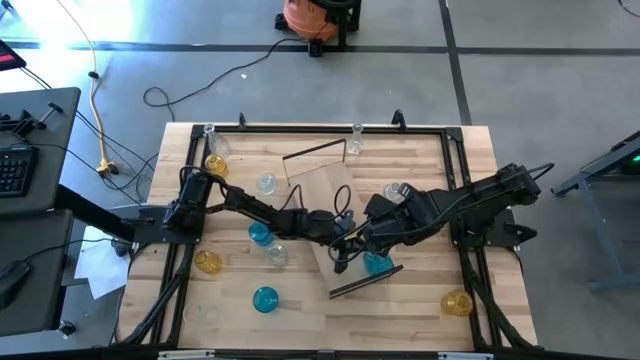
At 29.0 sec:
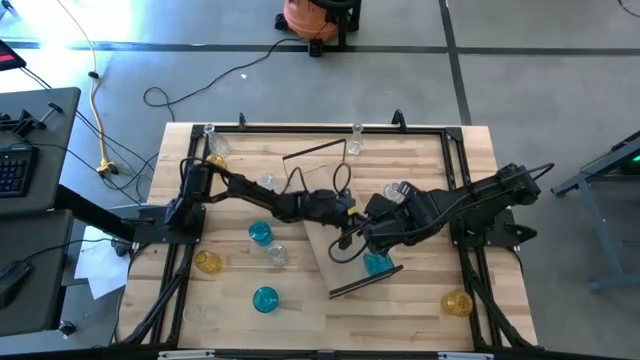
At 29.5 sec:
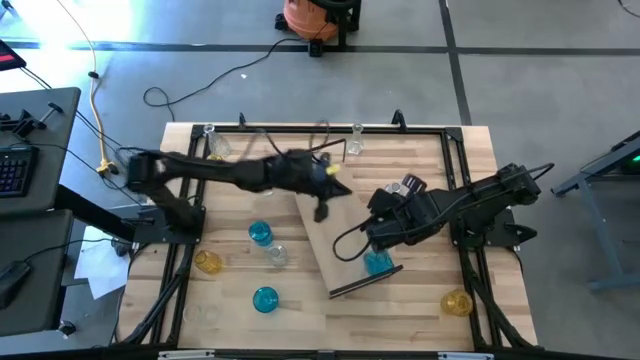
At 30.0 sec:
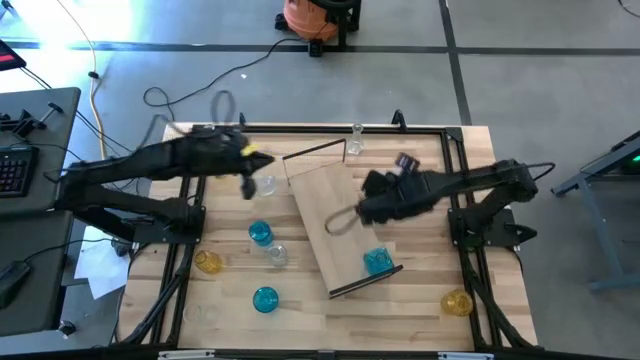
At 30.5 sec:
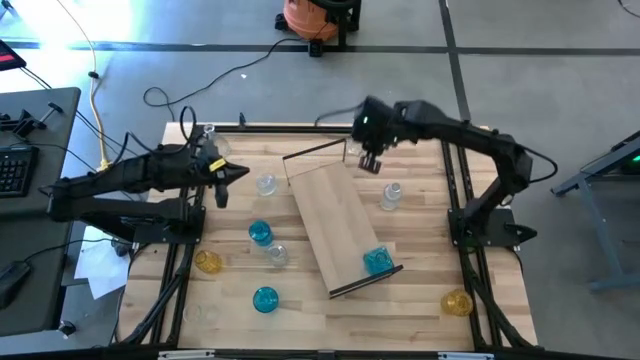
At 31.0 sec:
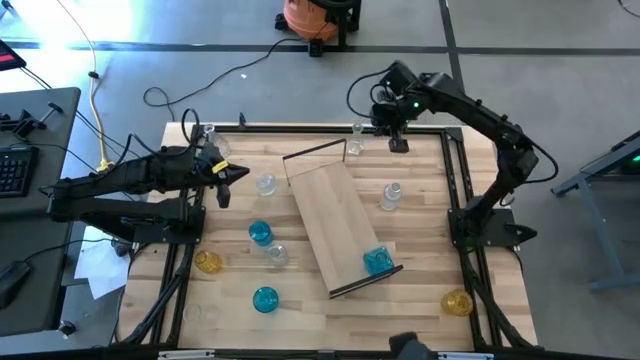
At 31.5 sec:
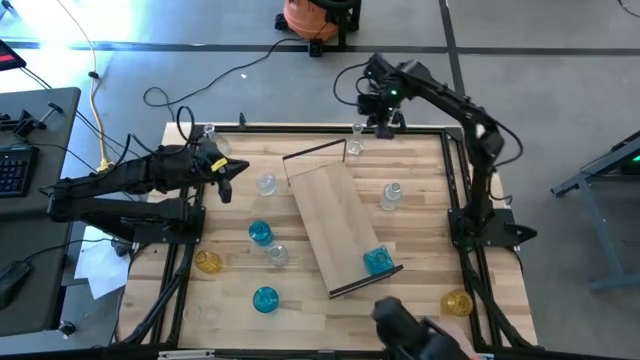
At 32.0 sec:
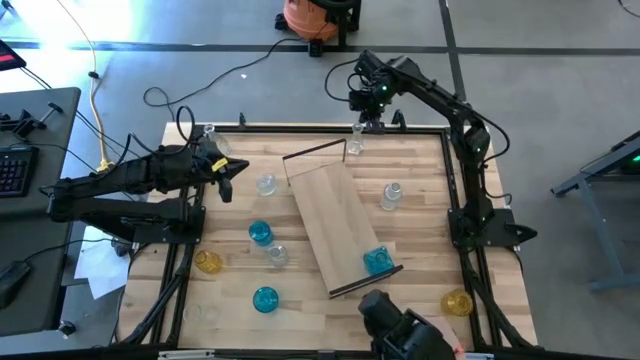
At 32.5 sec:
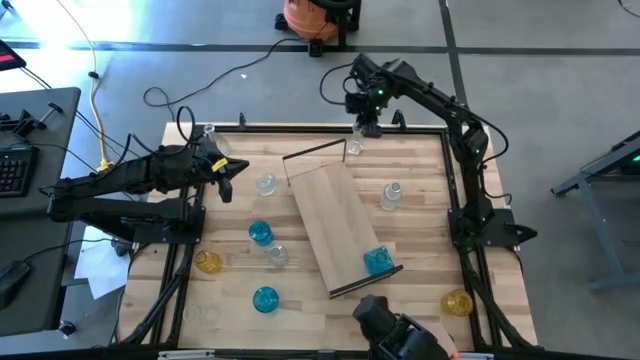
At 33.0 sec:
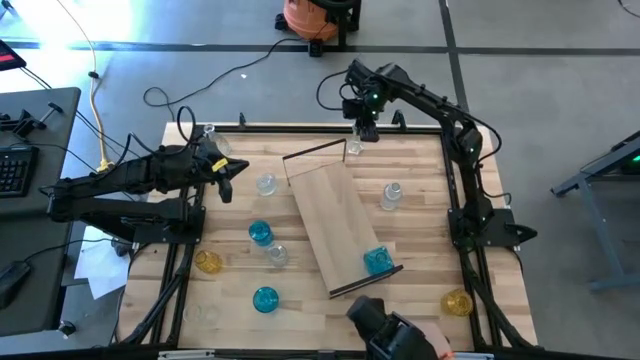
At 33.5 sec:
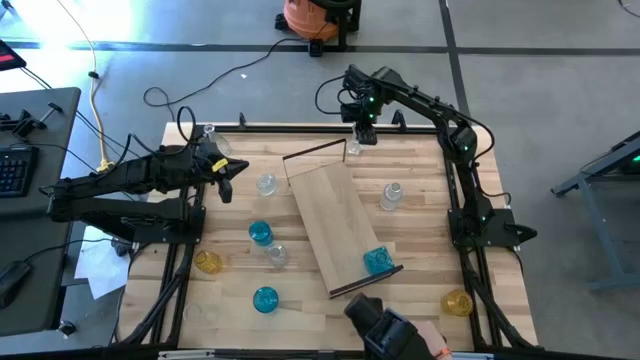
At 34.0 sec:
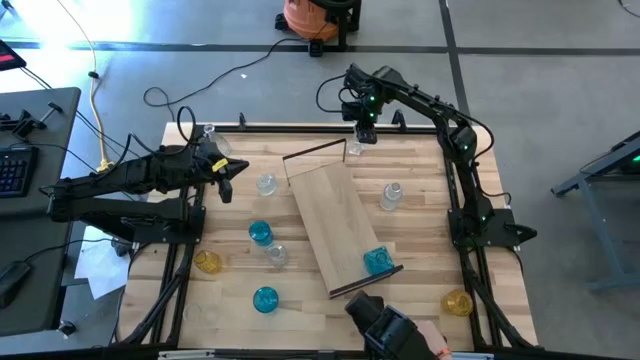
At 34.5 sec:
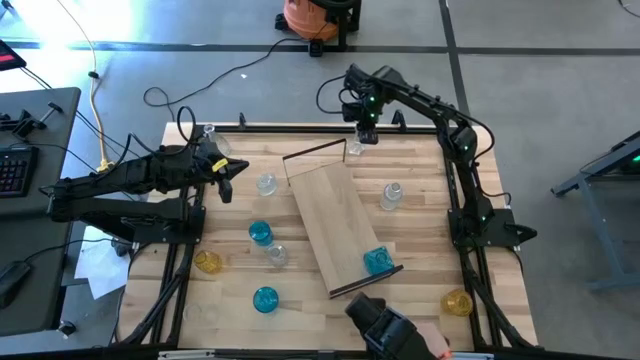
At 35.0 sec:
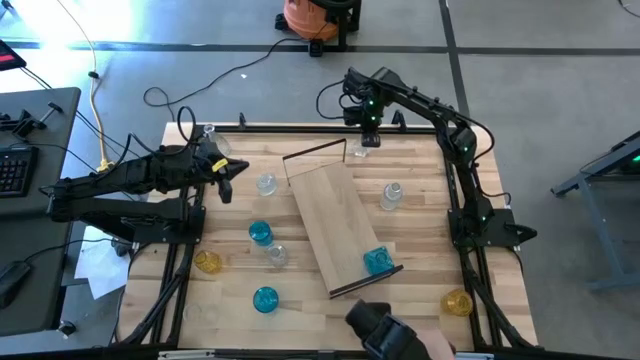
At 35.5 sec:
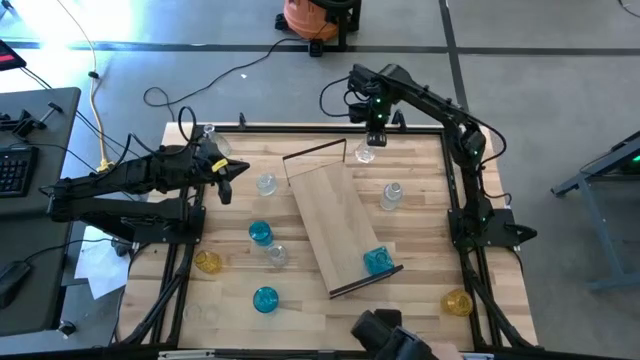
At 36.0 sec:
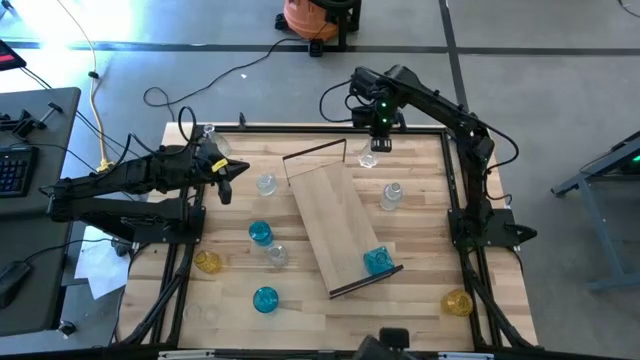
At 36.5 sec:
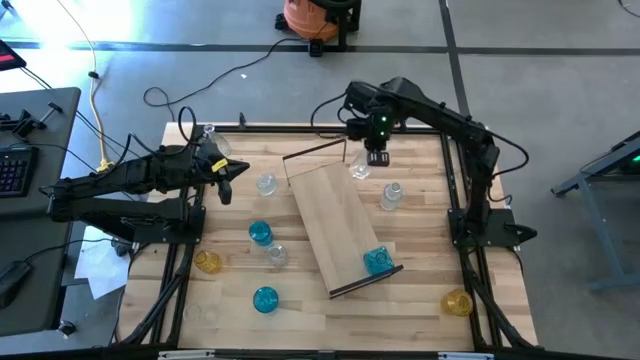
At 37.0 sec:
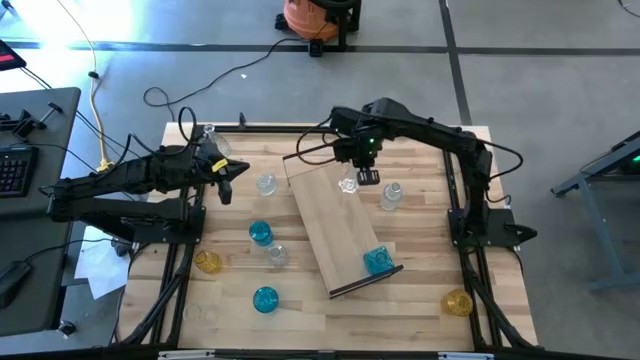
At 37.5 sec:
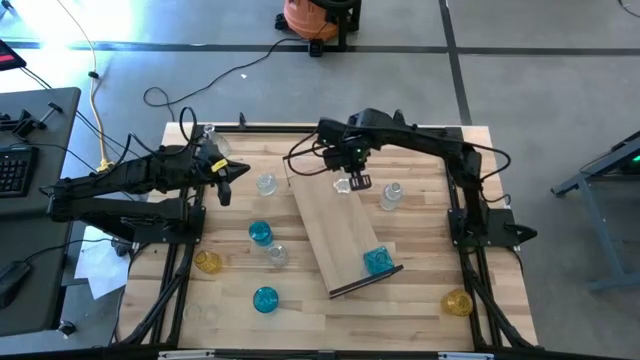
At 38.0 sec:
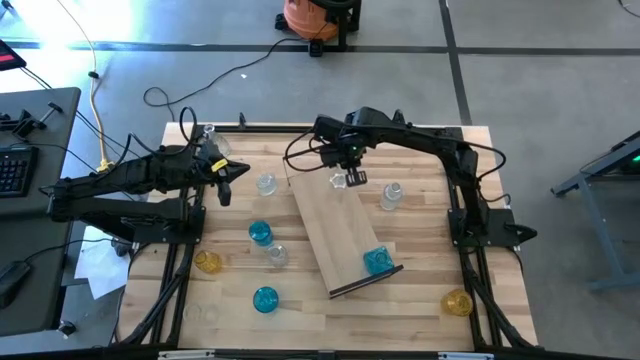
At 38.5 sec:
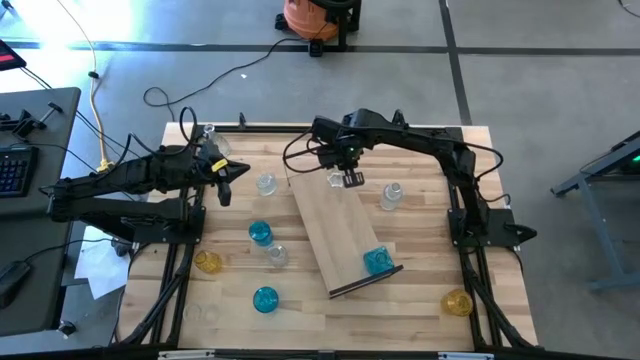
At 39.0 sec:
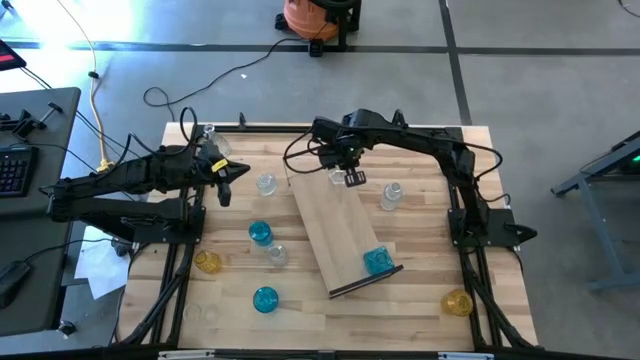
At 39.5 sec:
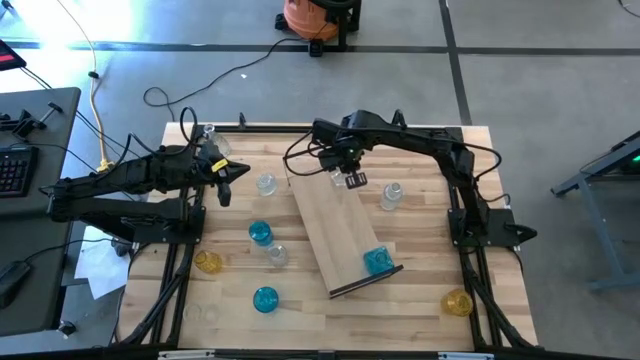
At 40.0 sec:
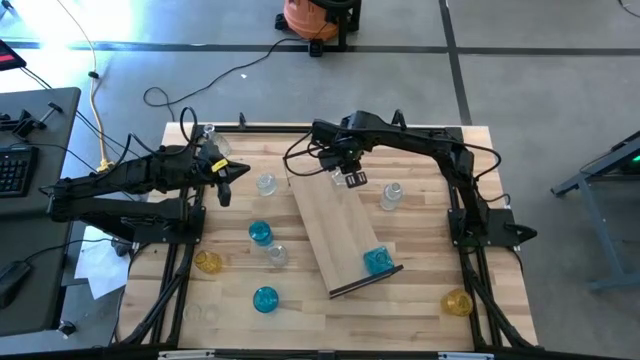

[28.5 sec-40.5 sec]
Task: sort vases onto shelf
Put the transparent crystal vase on the shelf

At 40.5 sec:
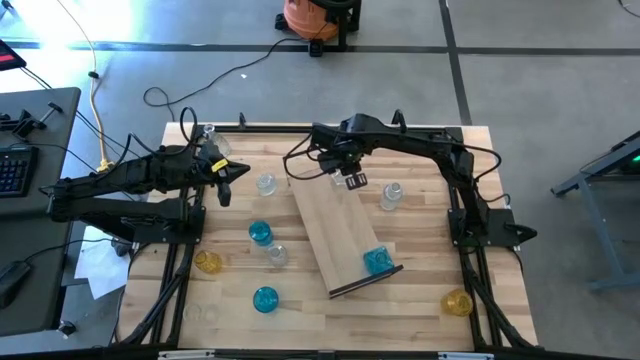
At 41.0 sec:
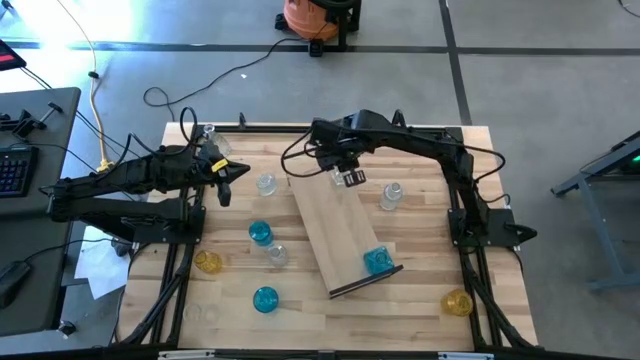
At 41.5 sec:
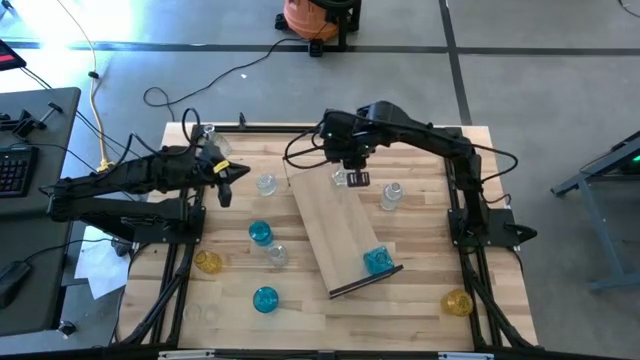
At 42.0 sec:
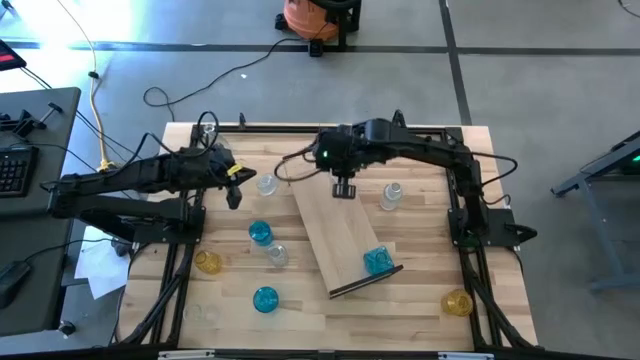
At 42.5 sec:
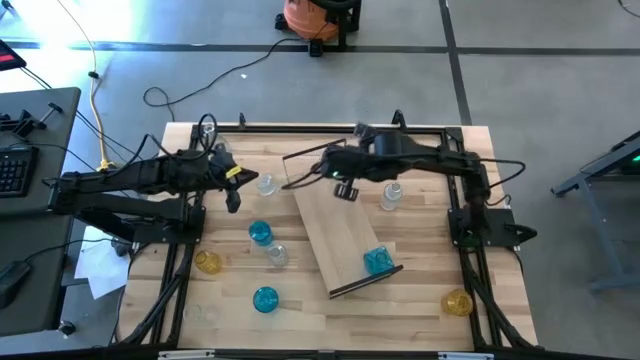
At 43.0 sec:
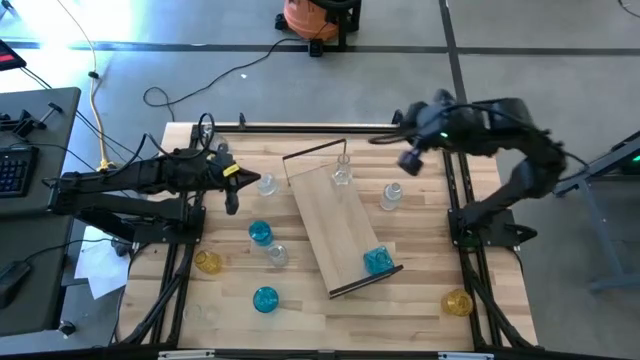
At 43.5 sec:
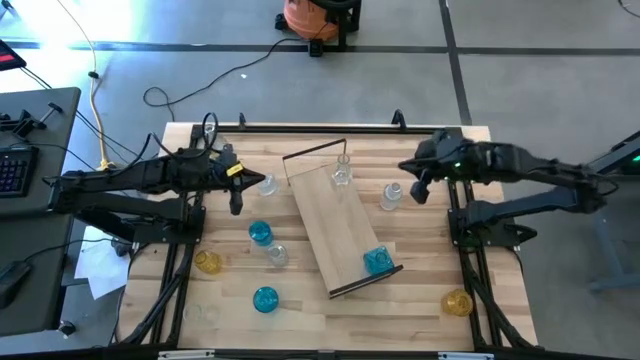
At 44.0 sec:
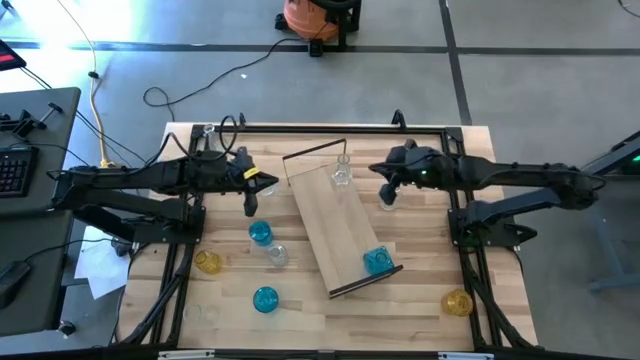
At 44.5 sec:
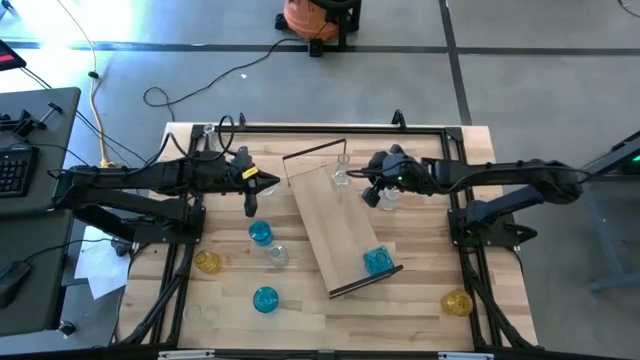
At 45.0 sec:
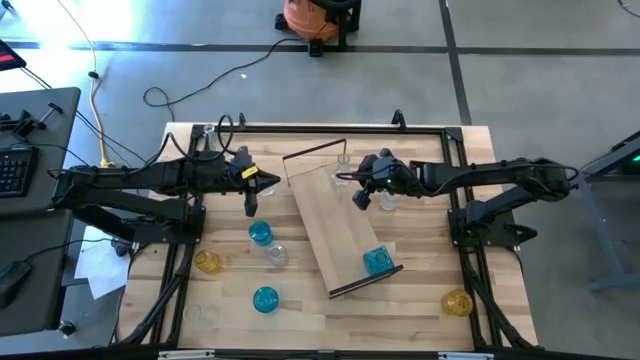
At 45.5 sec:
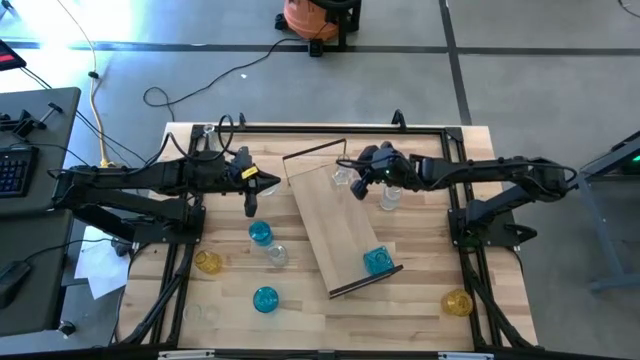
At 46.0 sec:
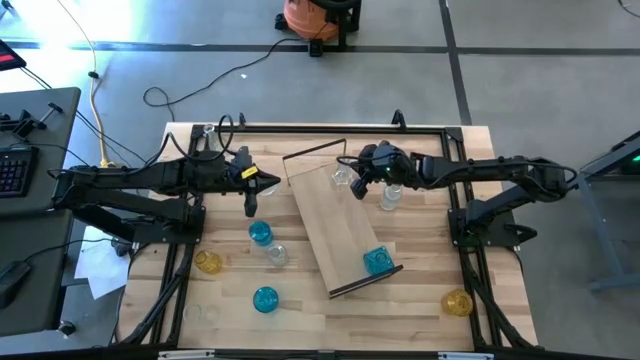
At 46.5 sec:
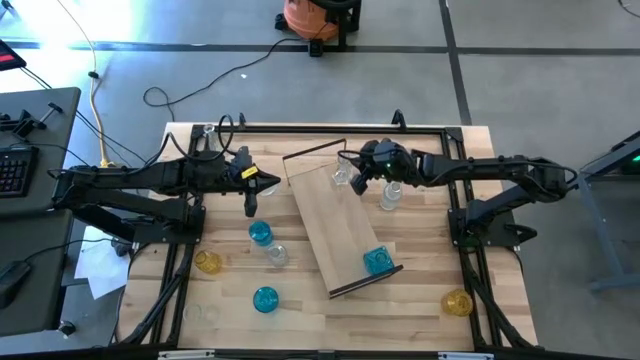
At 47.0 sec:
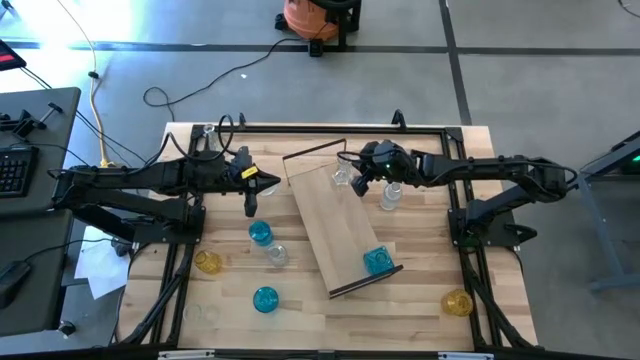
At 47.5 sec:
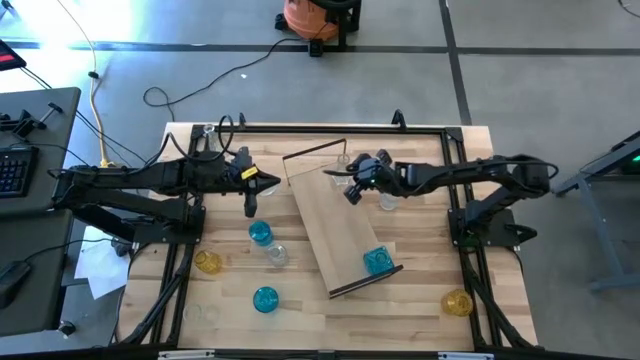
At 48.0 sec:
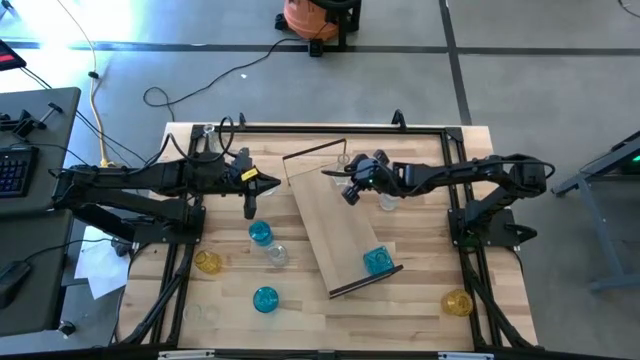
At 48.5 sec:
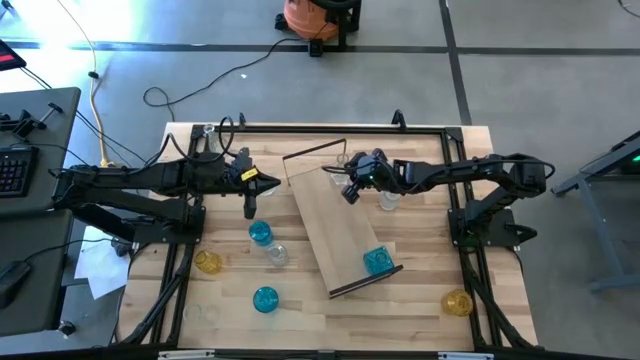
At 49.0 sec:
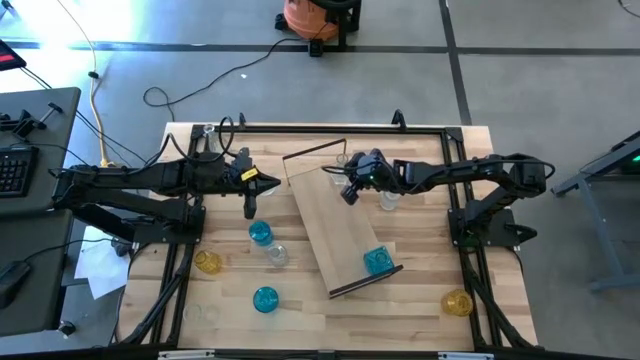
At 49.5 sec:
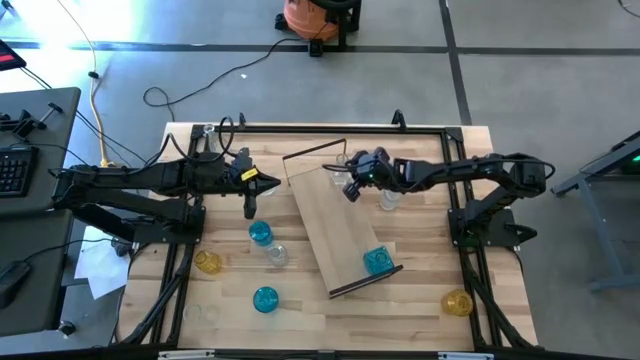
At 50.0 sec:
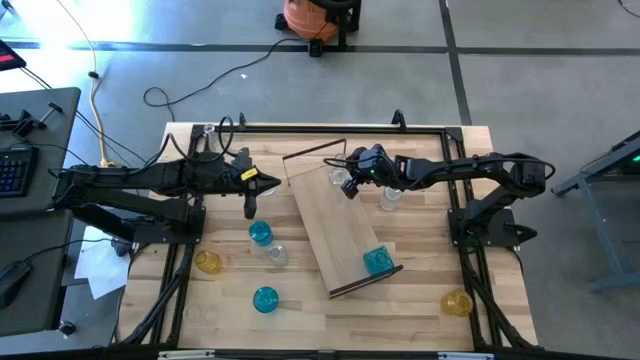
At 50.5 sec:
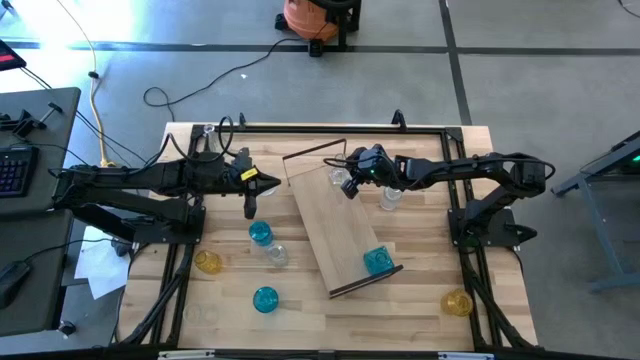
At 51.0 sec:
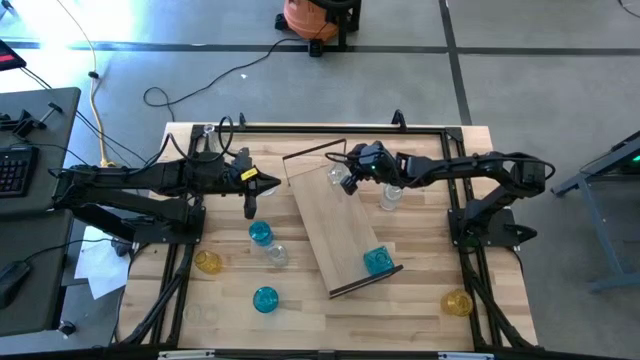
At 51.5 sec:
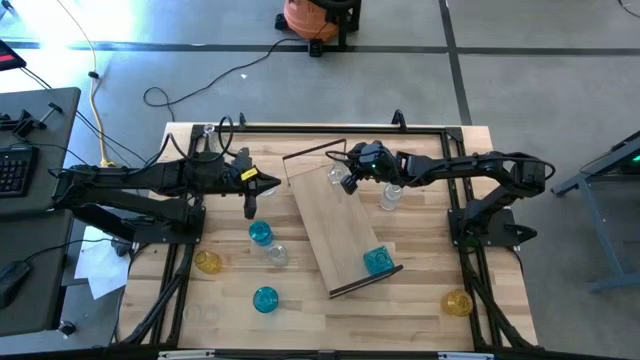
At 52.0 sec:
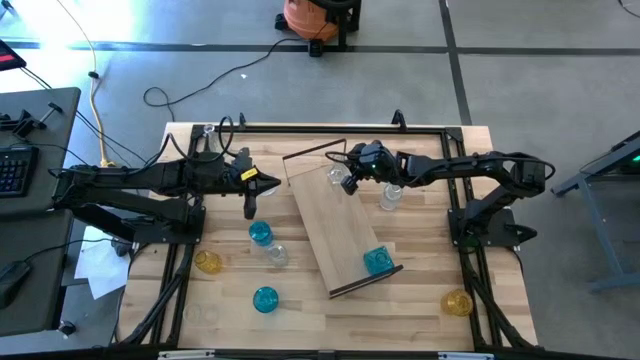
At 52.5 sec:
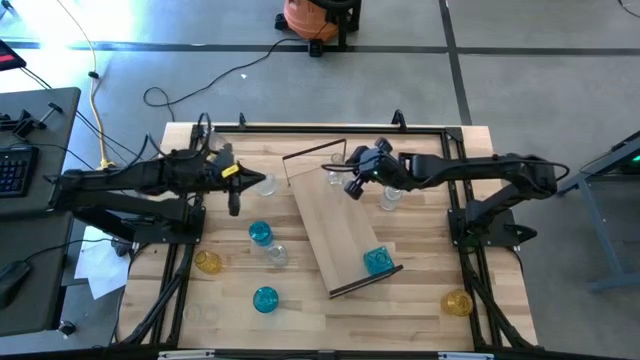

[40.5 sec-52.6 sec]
Put the transparent crystal vase on the shelf
